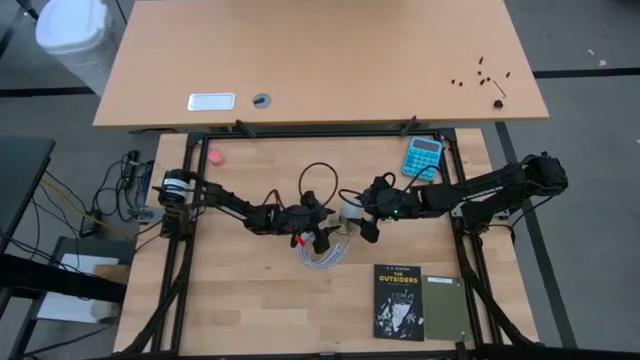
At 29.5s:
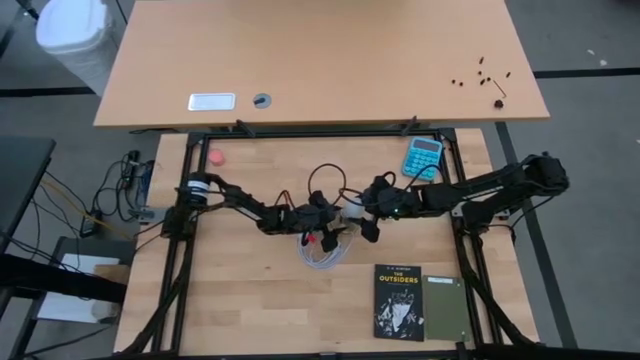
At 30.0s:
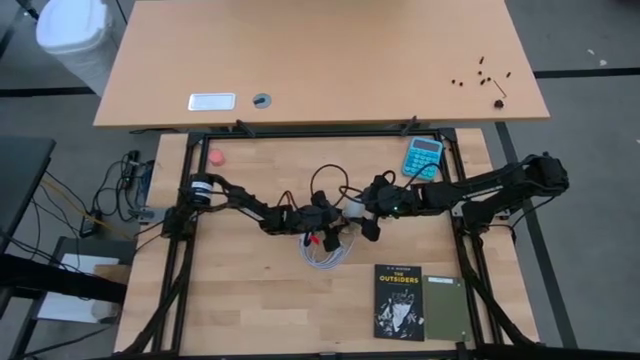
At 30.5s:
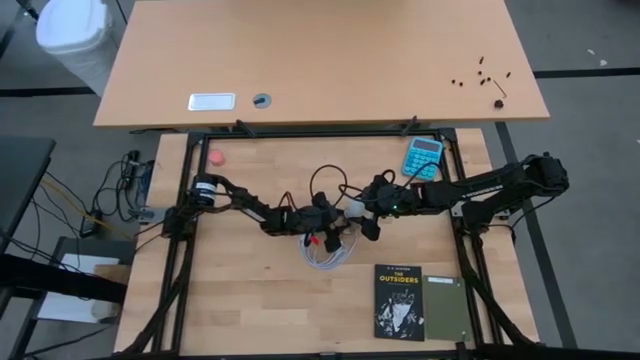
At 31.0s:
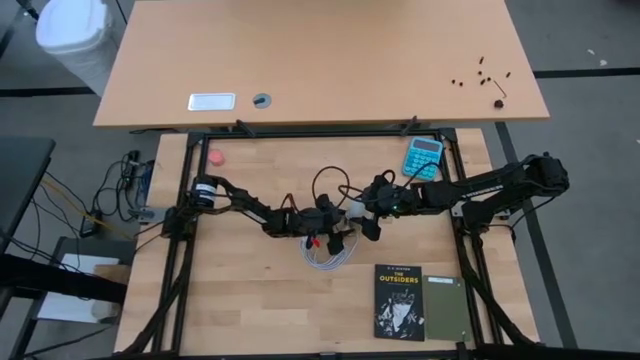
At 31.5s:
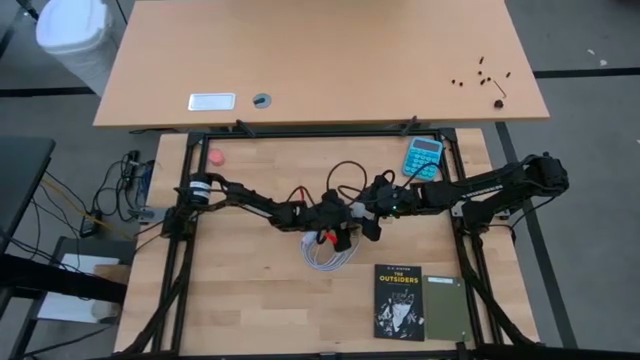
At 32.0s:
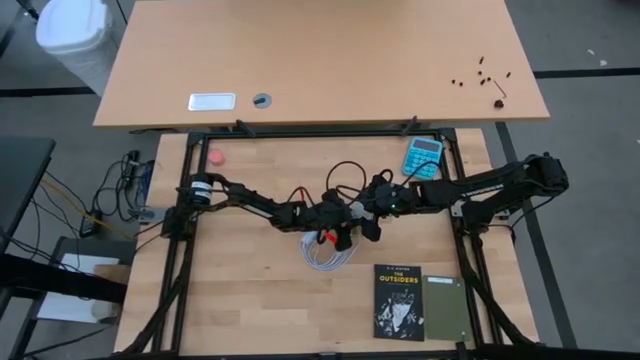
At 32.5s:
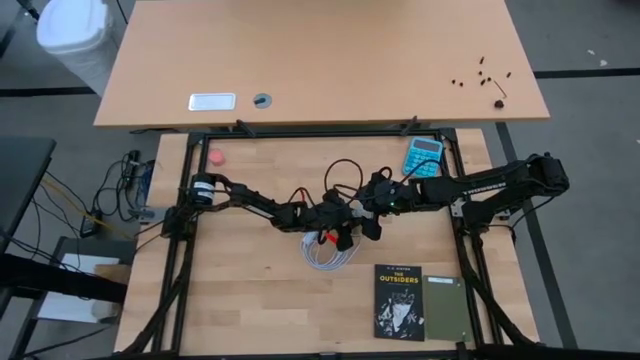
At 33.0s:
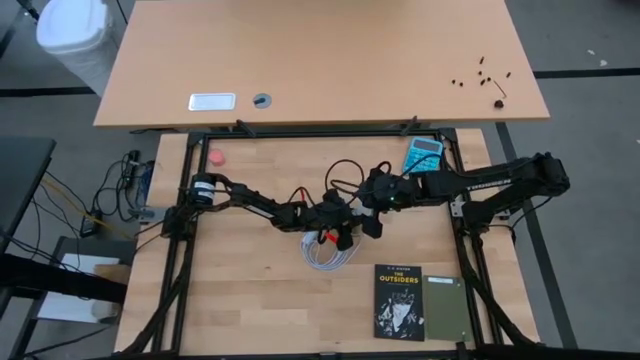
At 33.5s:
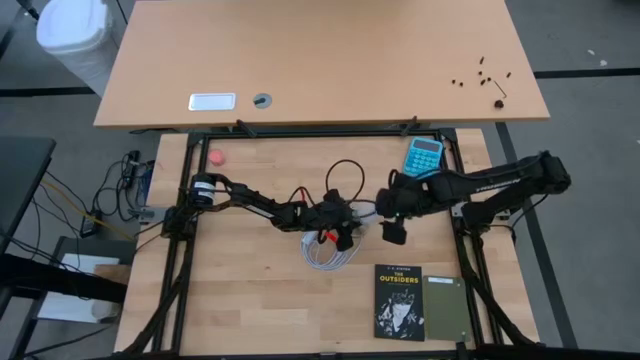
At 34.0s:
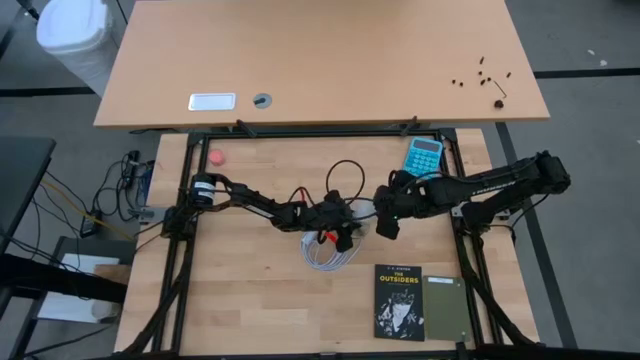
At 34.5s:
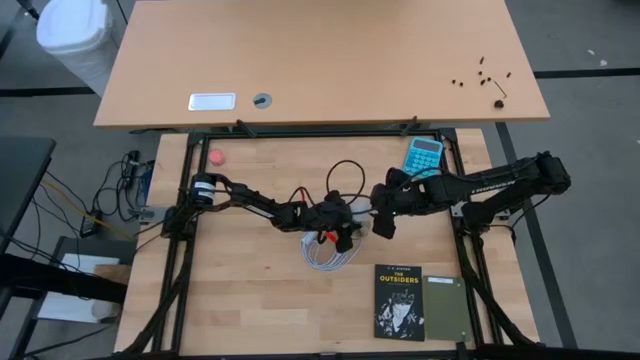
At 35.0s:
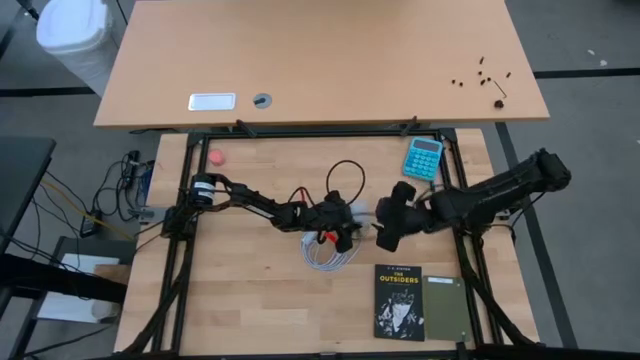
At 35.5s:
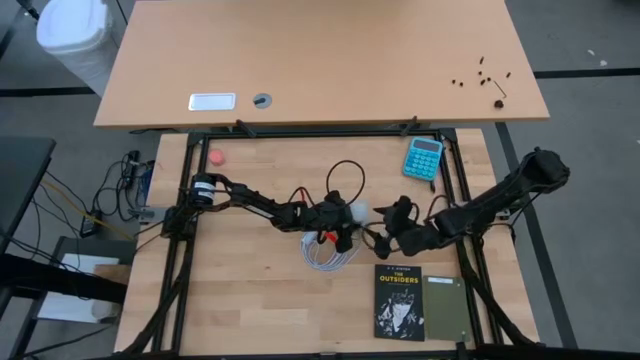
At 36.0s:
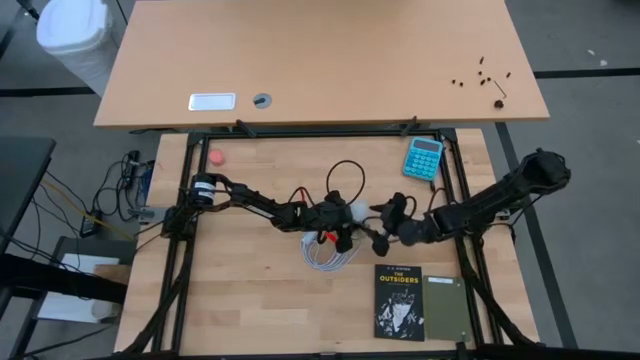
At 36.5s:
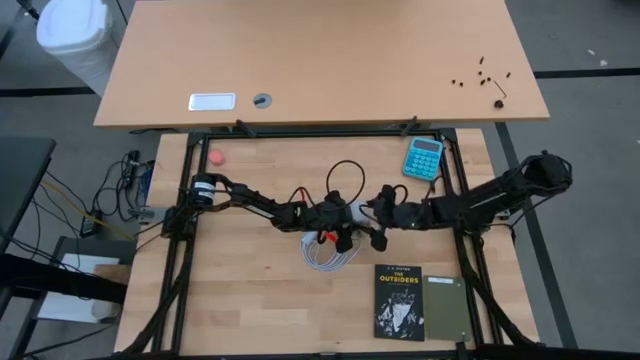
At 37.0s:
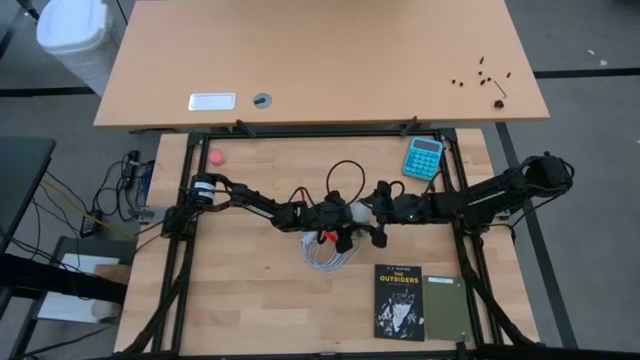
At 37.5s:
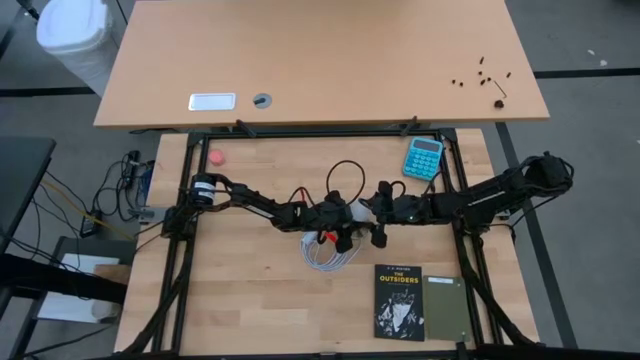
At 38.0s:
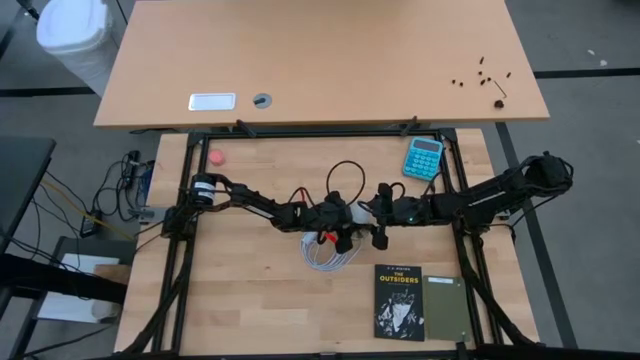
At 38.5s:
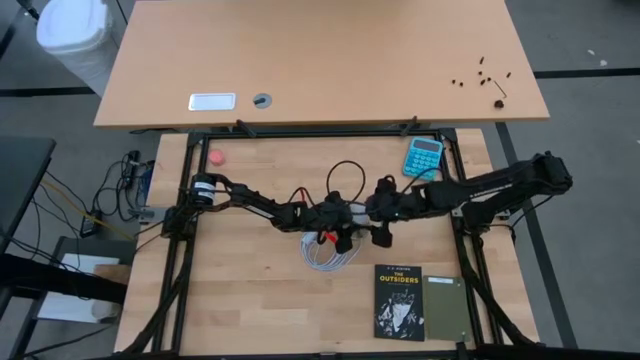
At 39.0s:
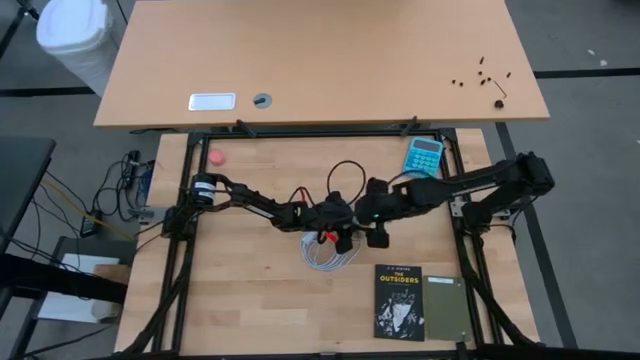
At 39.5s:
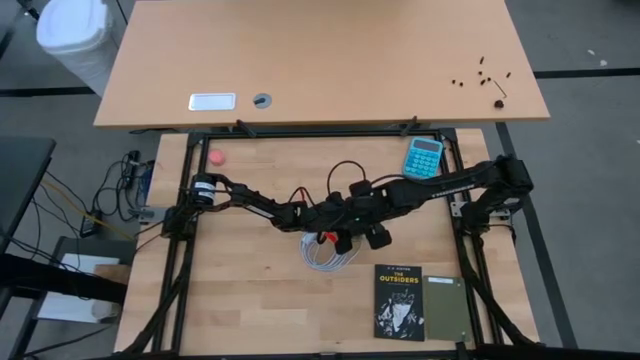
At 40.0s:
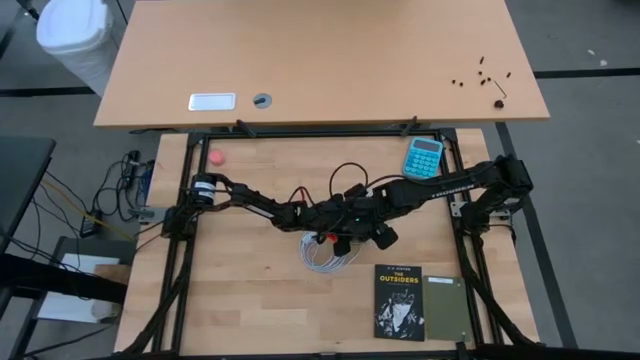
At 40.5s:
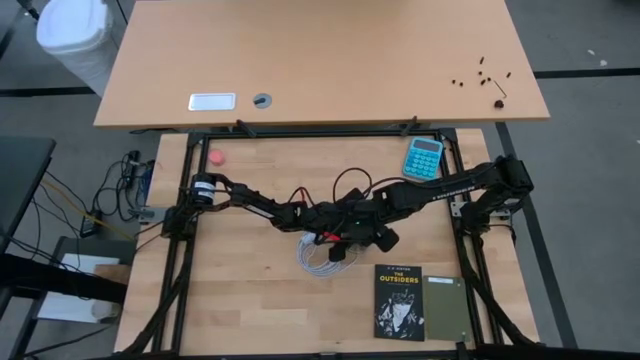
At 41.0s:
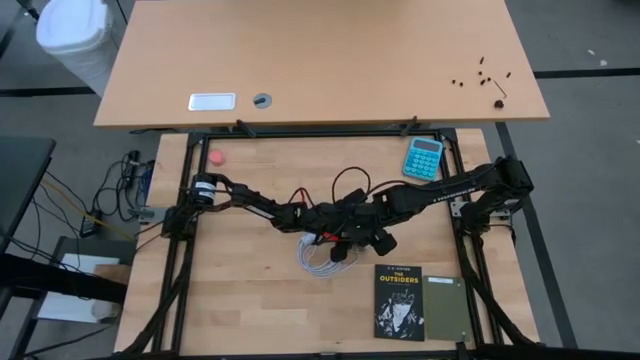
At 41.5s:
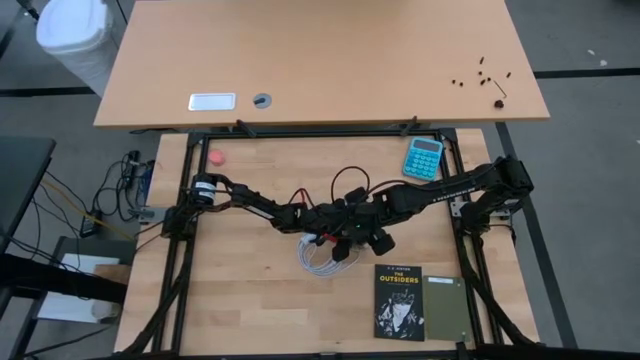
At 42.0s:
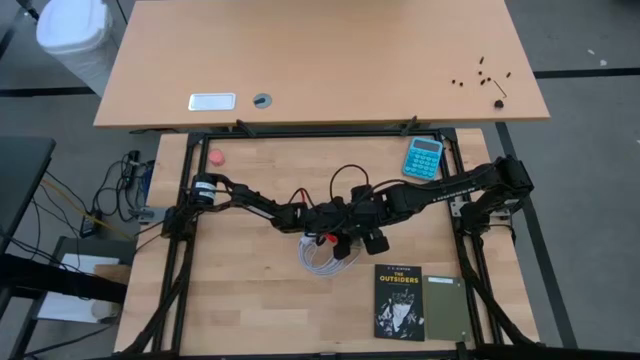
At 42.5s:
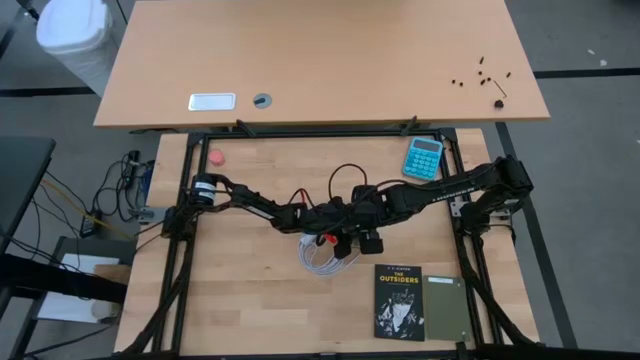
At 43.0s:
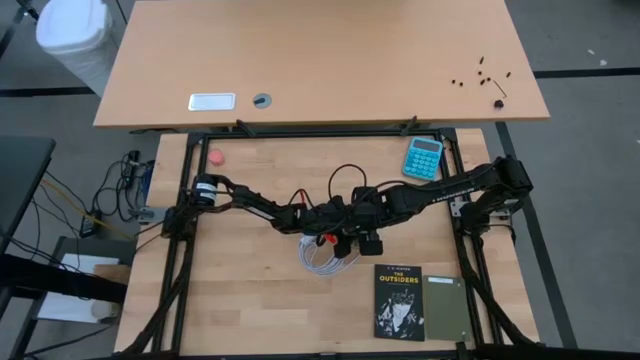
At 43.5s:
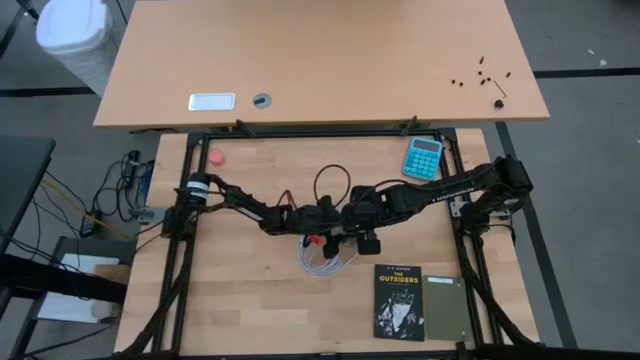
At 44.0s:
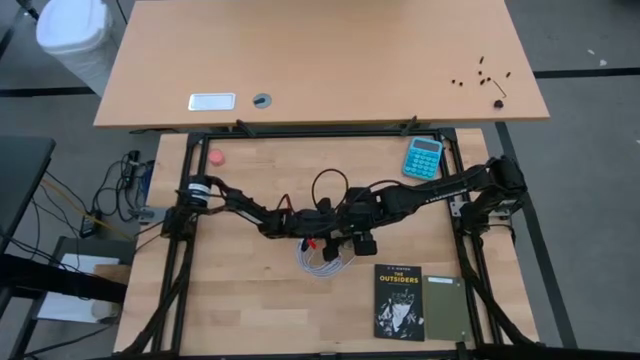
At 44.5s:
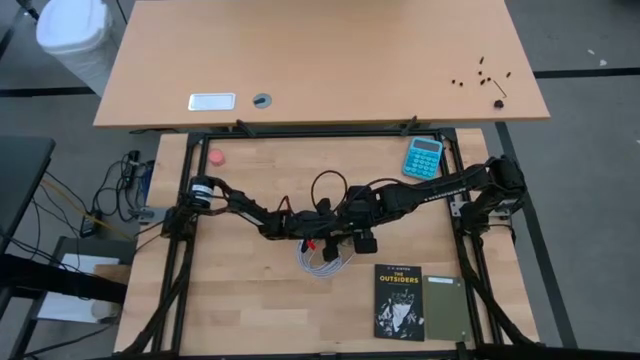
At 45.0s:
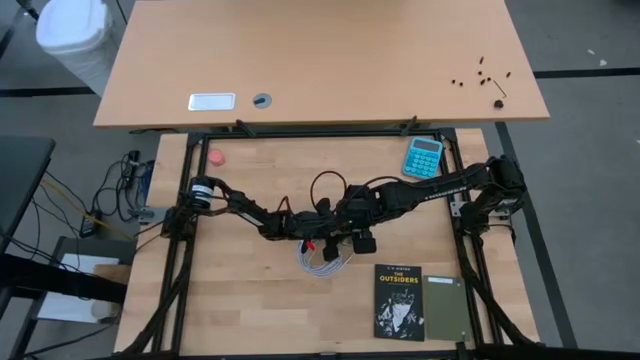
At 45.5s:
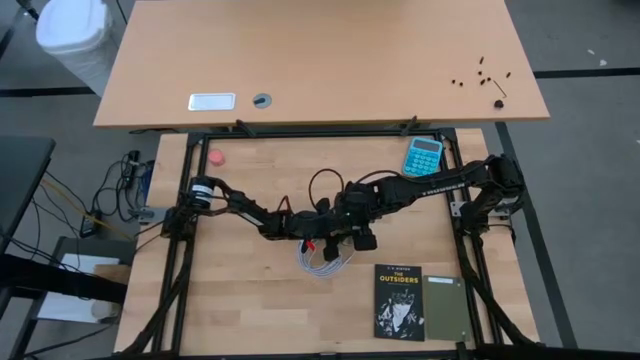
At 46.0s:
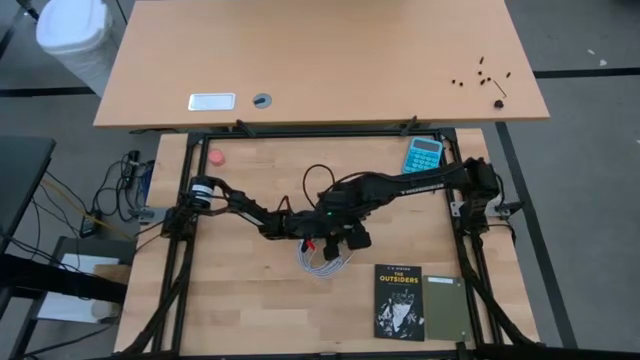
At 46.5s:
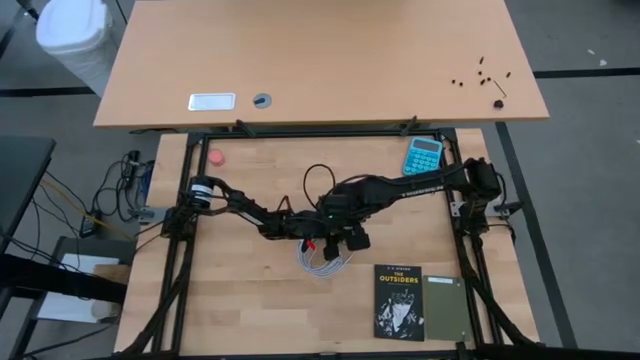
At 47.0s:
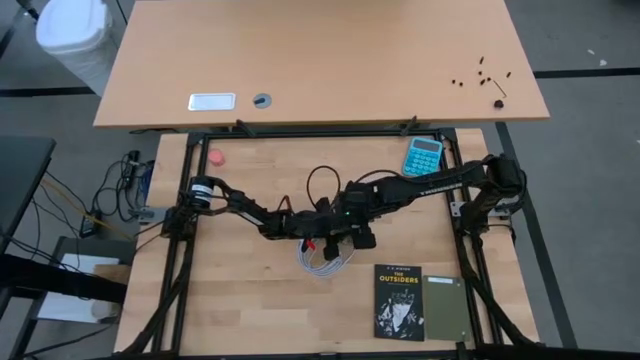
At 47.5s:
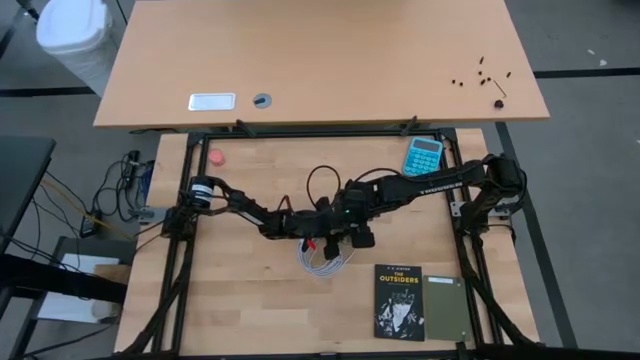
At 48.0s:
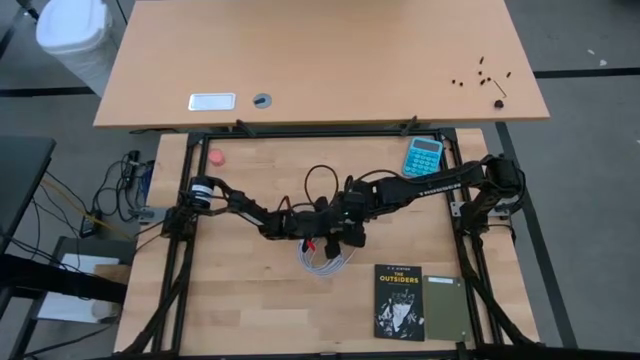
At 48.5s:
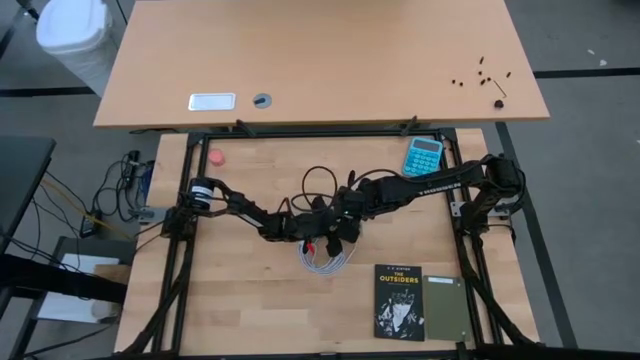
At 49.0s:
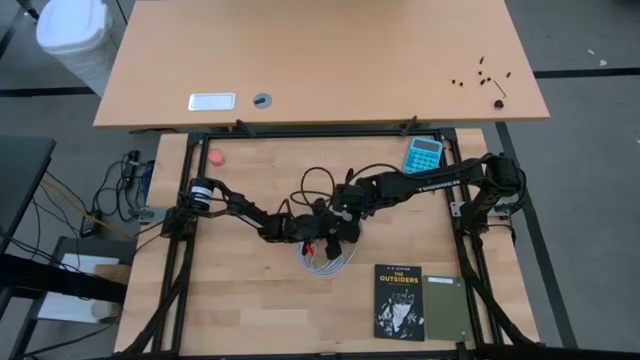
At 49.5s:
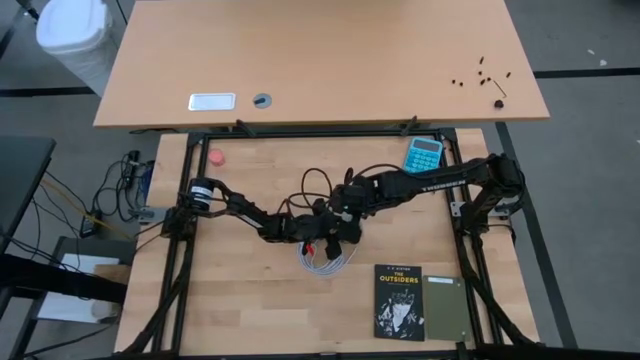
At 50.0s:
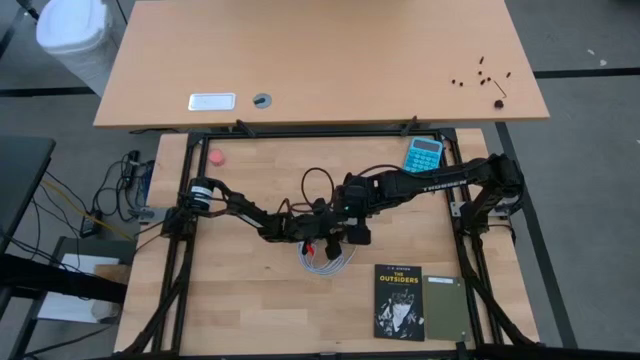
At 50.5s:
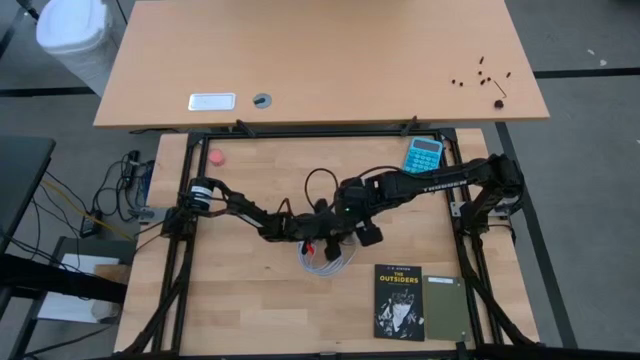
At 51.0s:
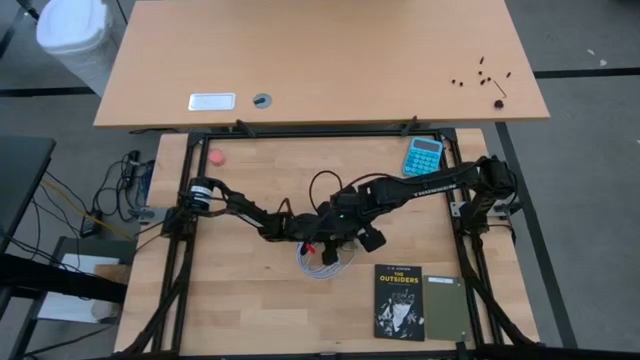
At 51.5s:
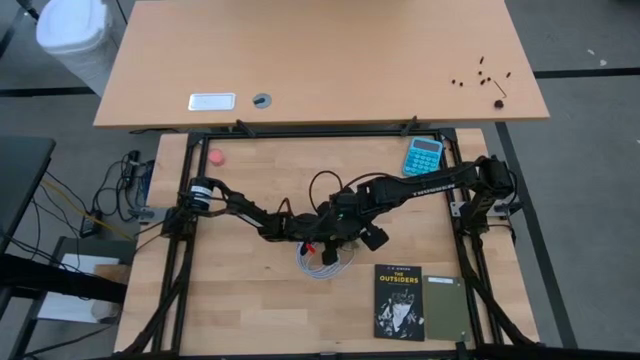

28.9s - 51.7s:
Task: Screw lightbulb
Insert the white lightbulb into the silver lamp
